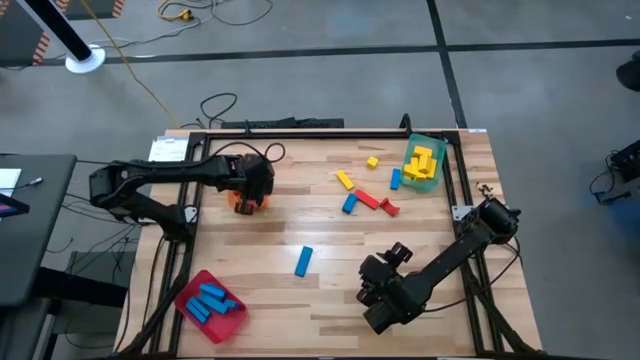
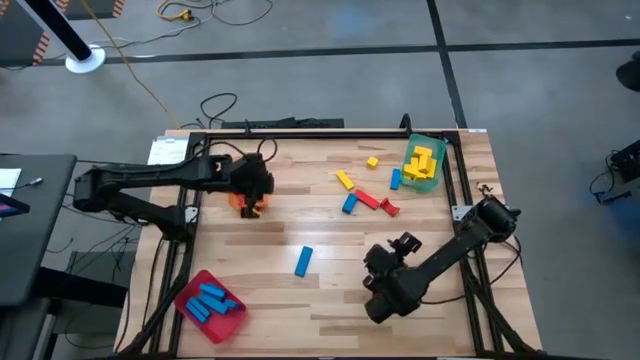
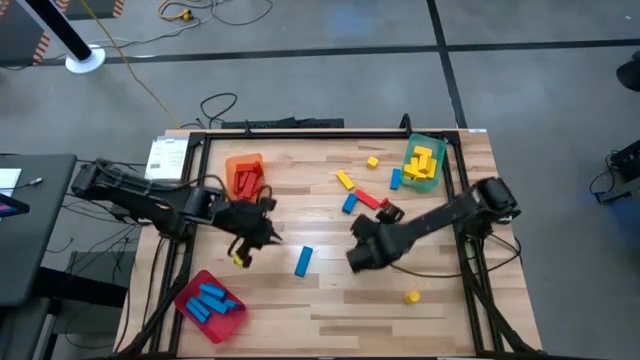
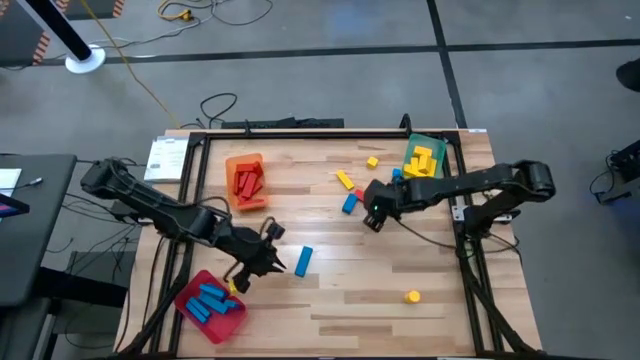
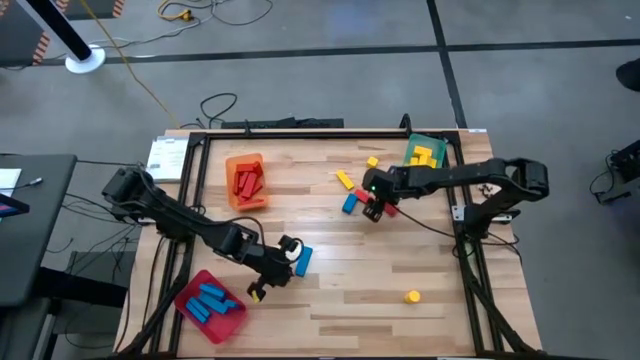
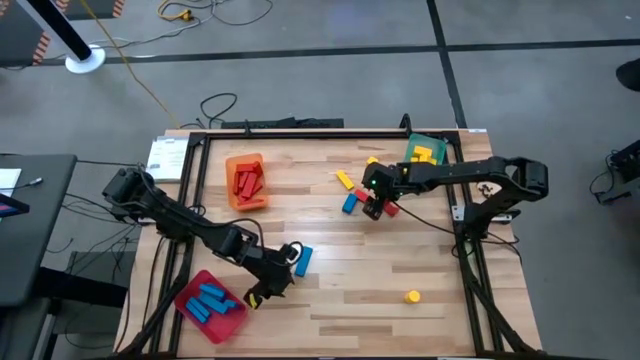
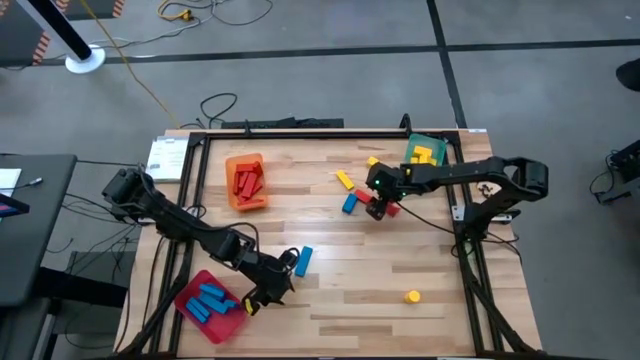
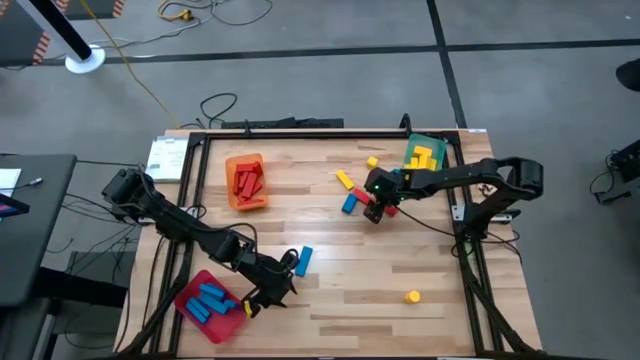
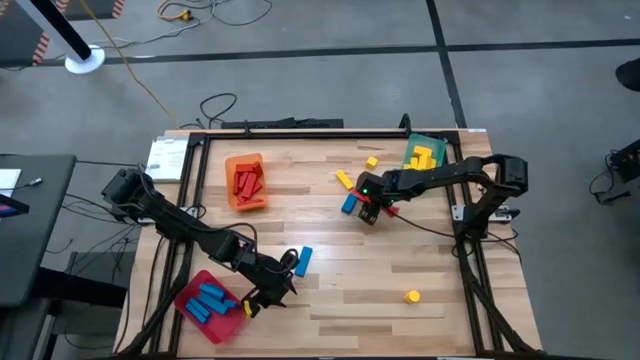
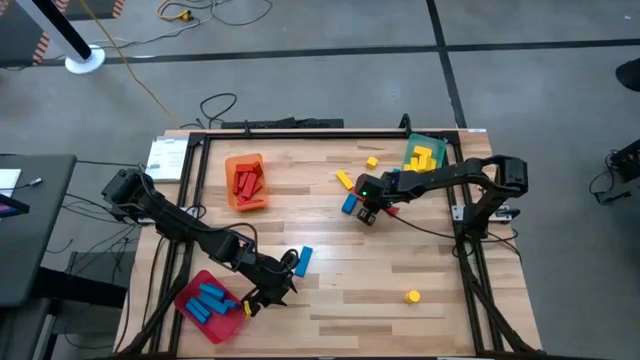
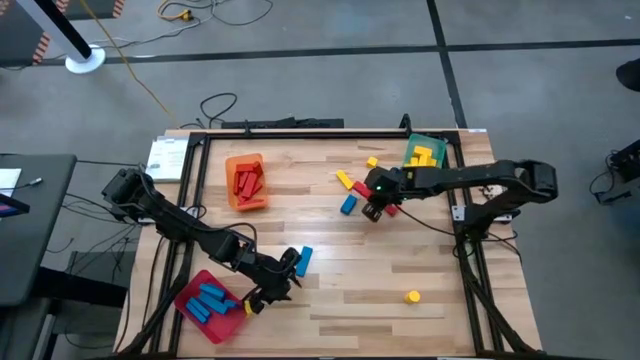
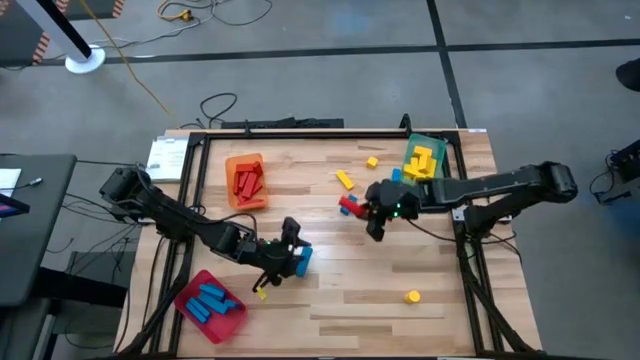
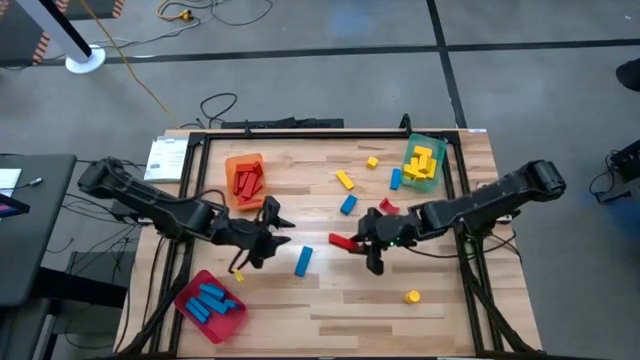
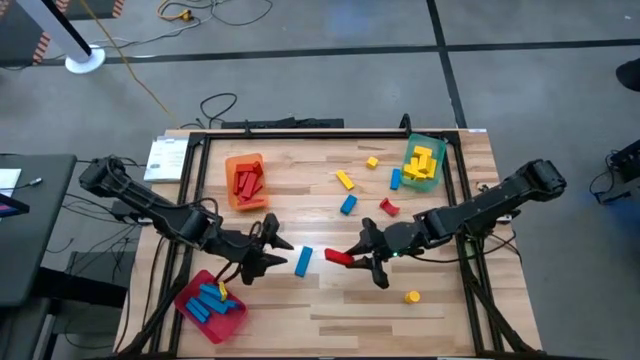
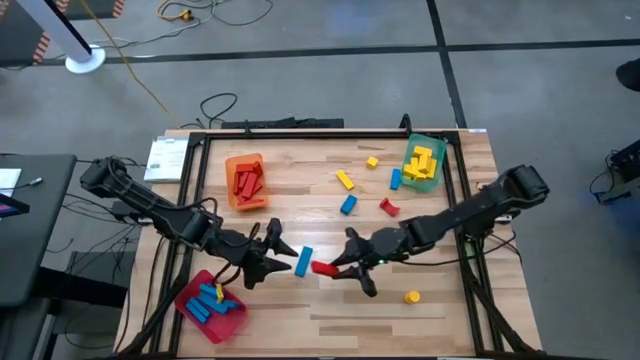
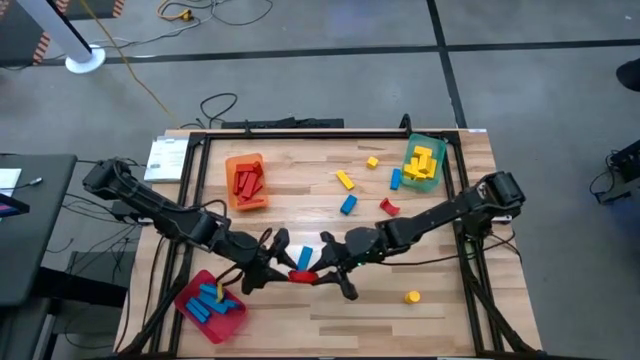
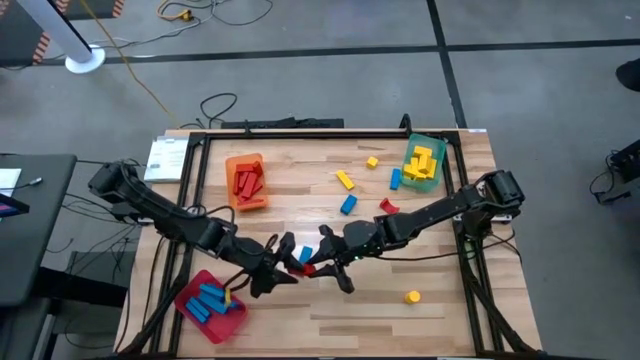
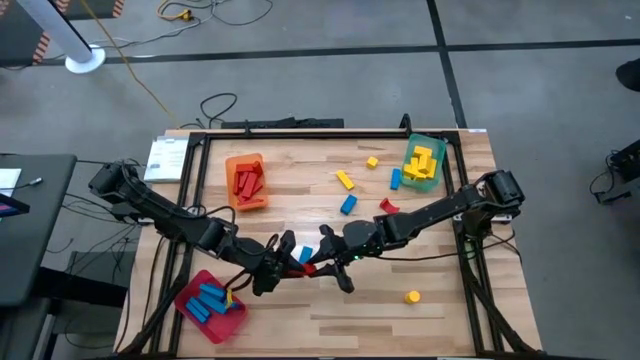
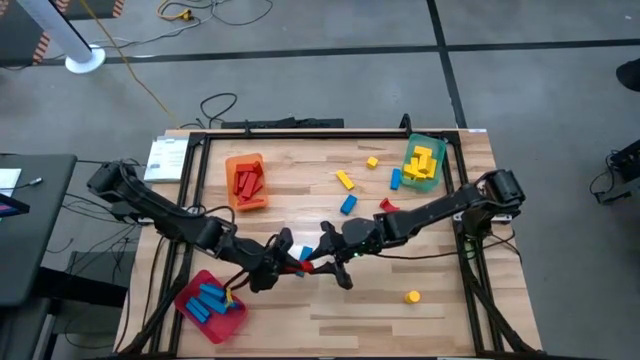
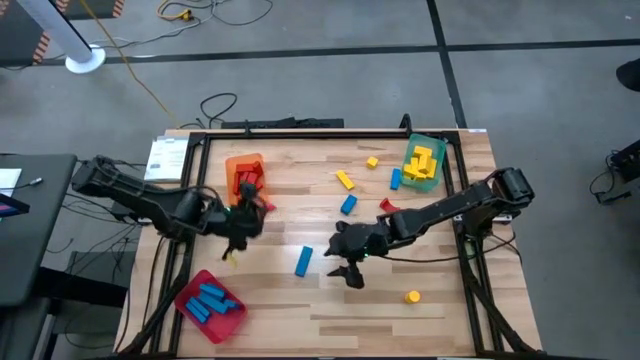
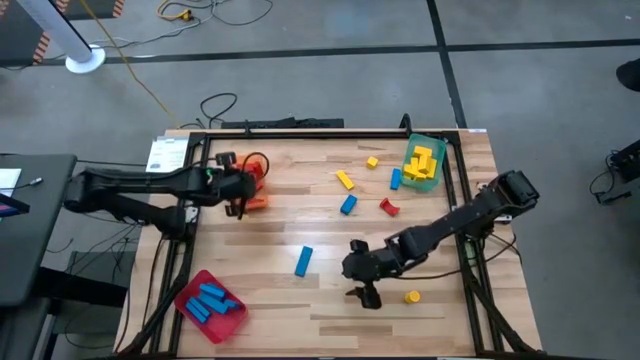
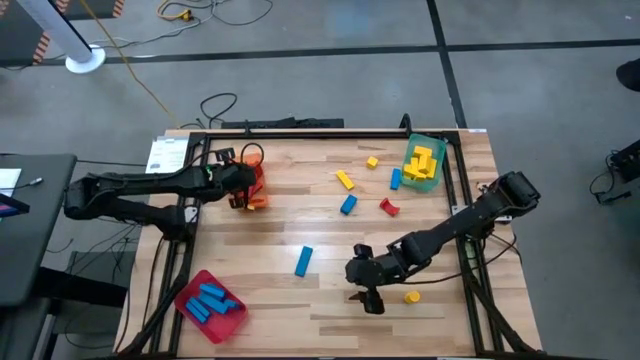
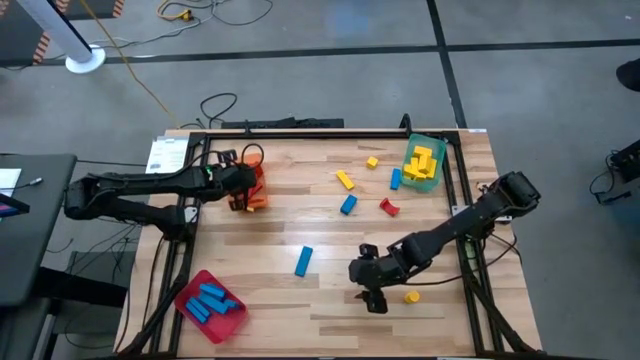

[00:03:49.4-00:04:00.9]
Task: Sort blocks
Put the red wooden block into the orange bin

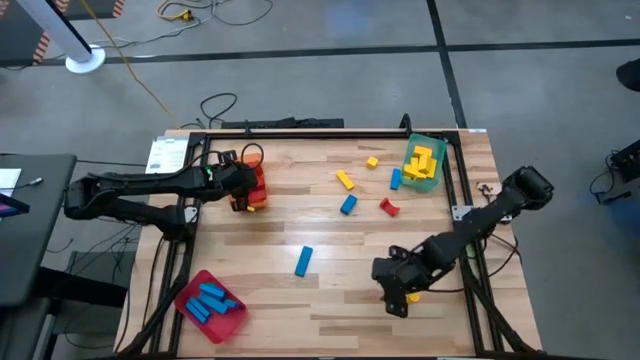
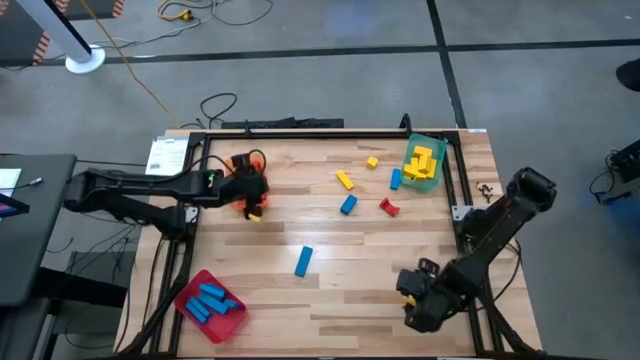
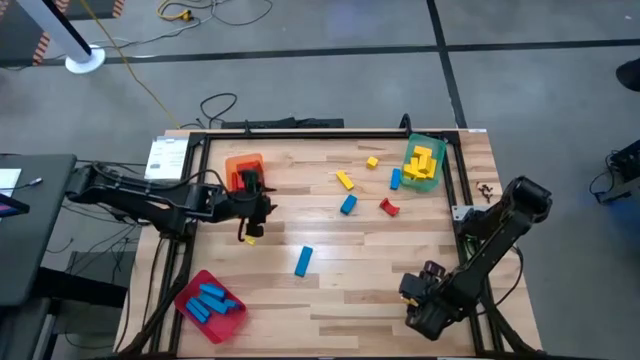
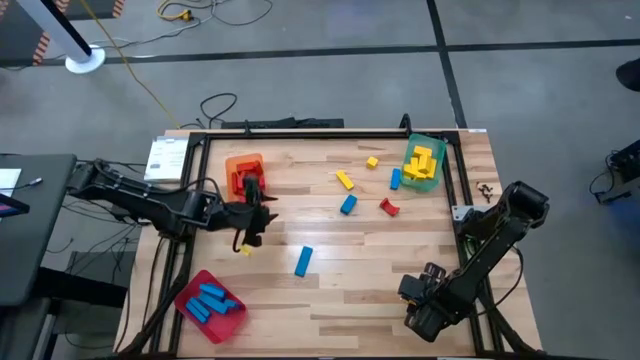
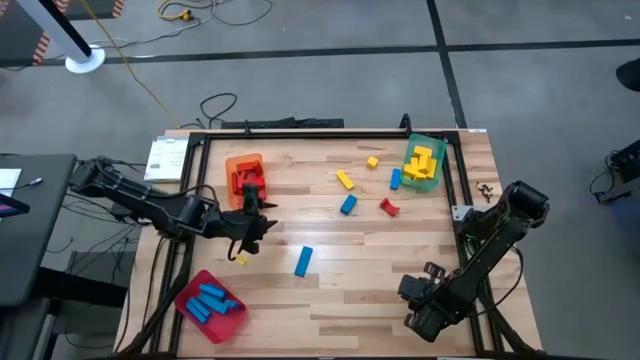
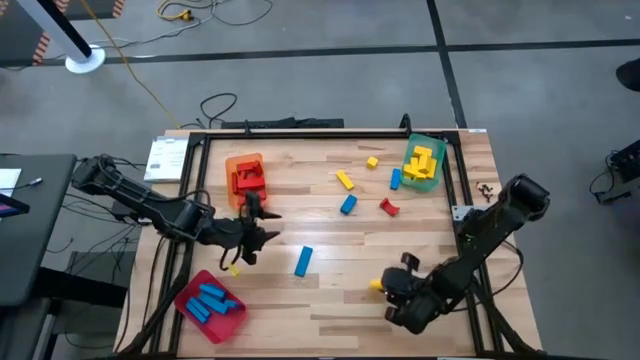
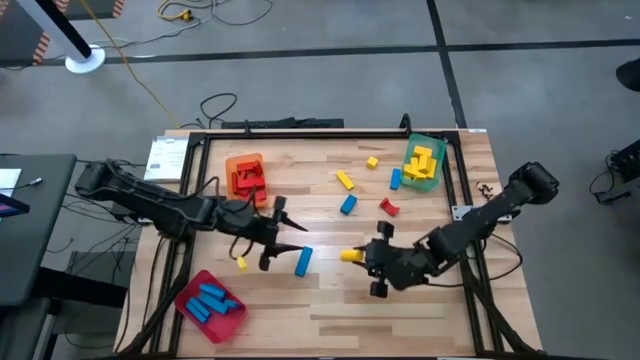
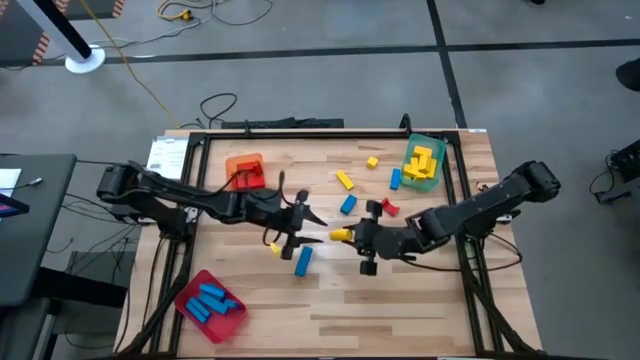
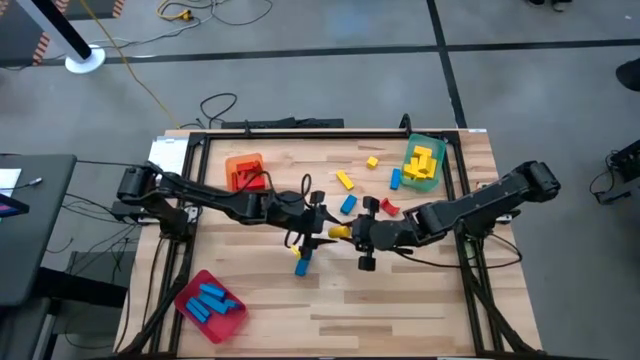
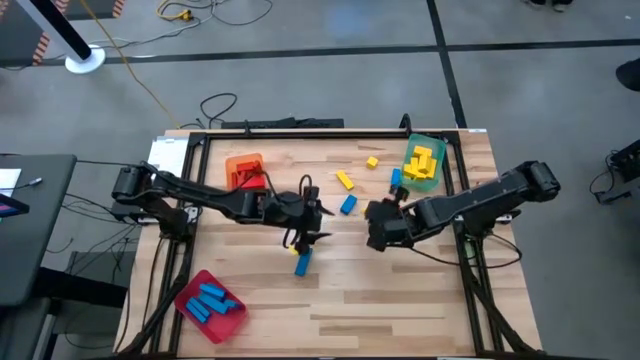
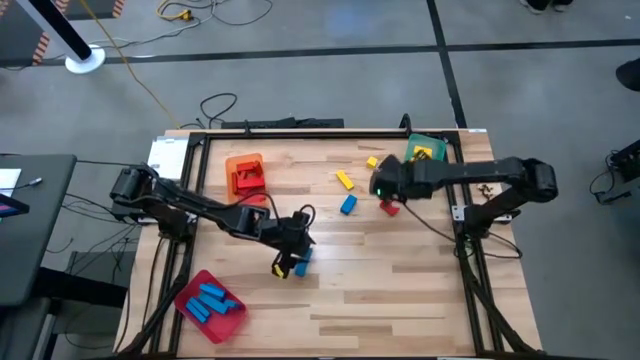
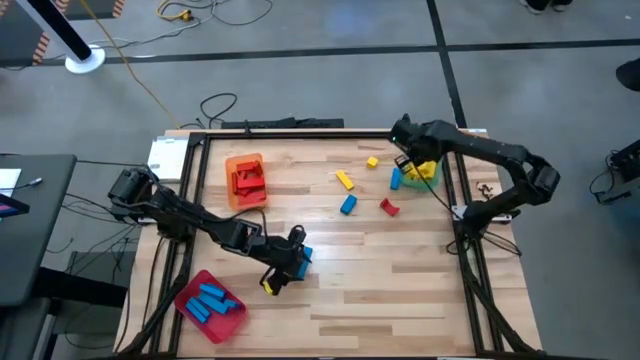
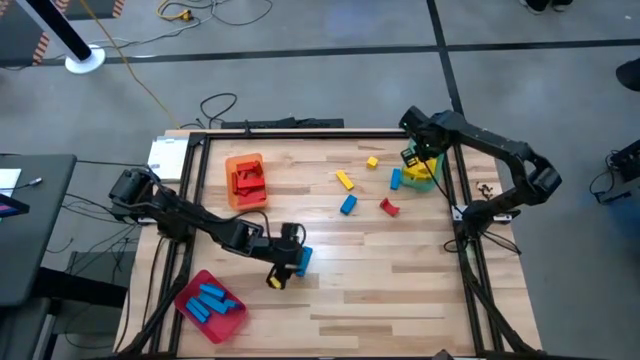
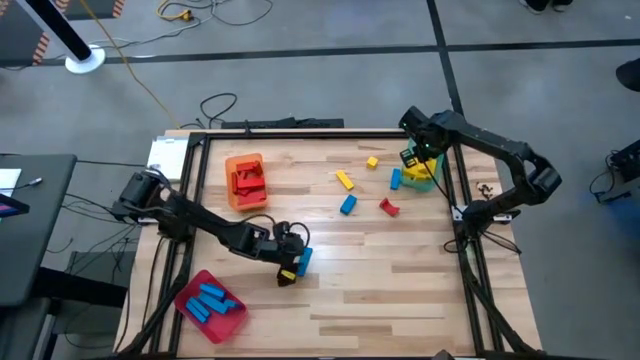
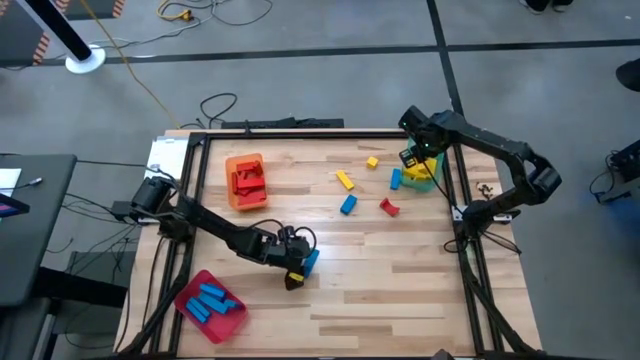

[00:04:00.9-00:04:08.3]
Put the yellow wooden block into the green bin
